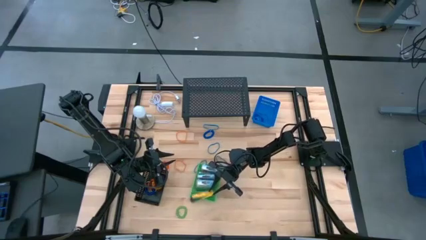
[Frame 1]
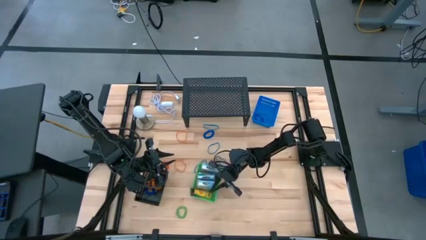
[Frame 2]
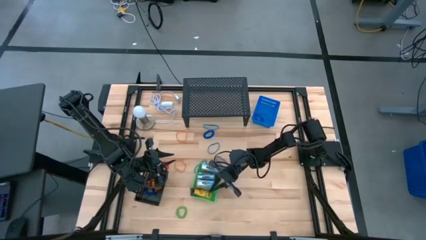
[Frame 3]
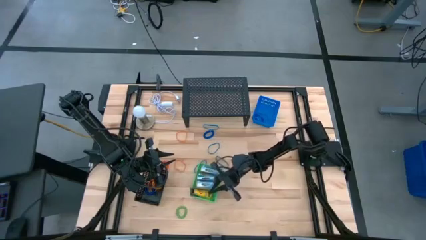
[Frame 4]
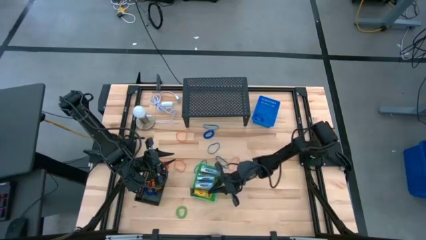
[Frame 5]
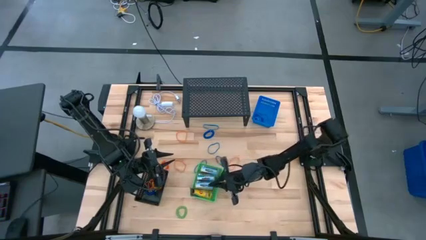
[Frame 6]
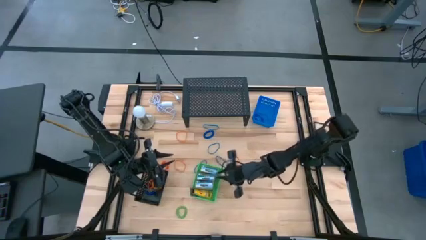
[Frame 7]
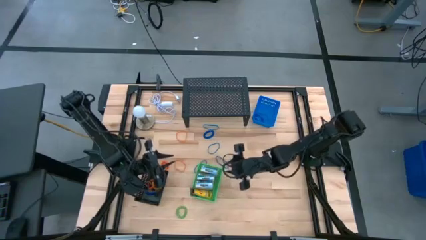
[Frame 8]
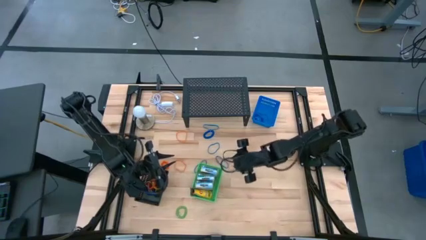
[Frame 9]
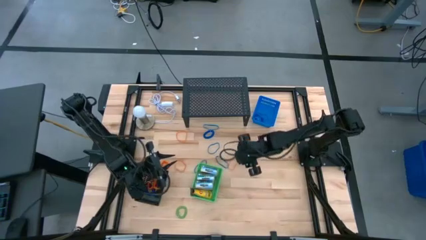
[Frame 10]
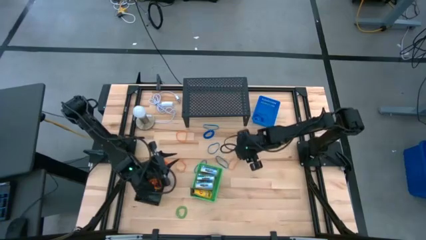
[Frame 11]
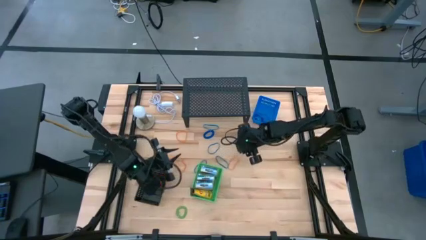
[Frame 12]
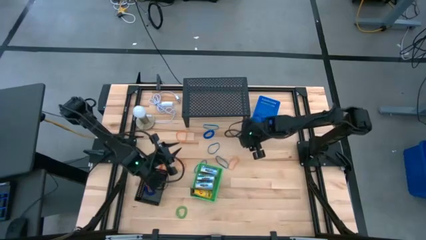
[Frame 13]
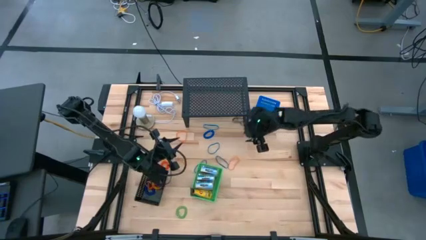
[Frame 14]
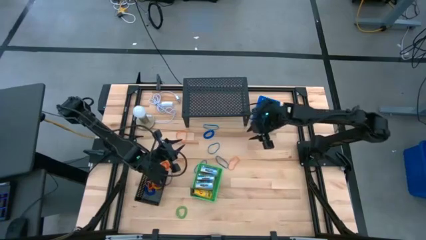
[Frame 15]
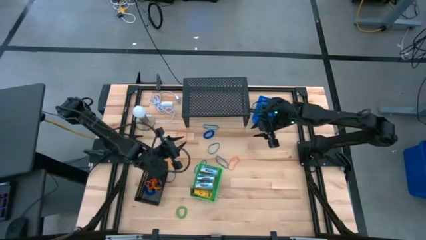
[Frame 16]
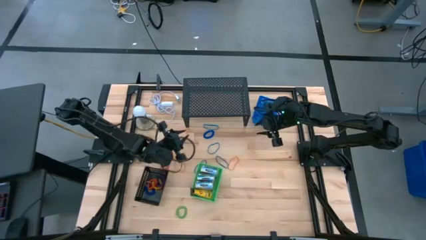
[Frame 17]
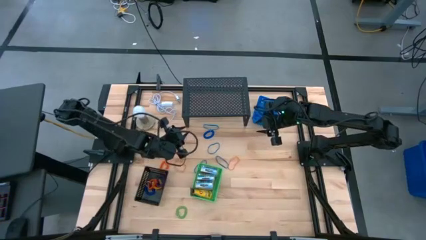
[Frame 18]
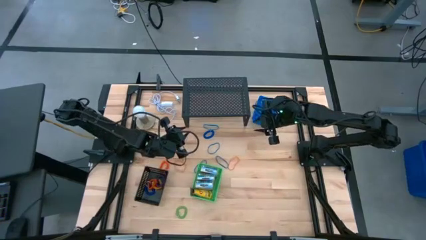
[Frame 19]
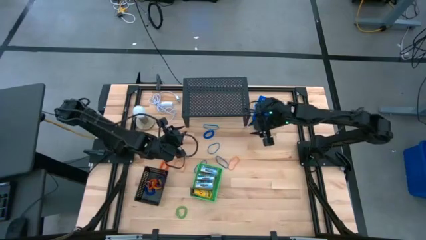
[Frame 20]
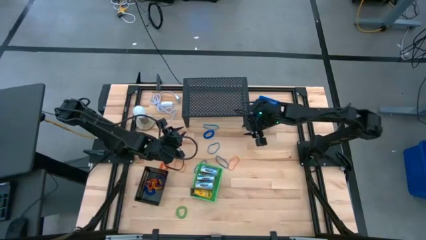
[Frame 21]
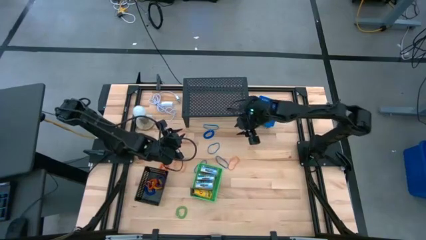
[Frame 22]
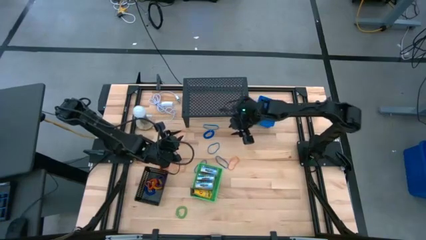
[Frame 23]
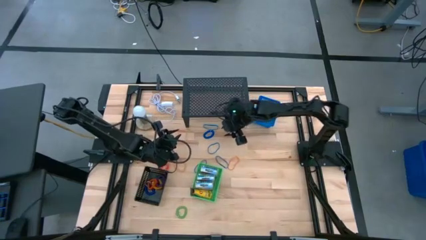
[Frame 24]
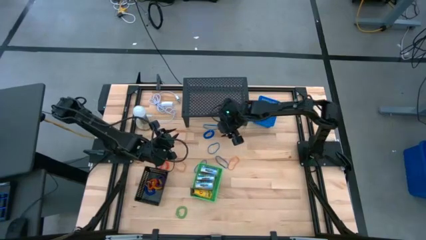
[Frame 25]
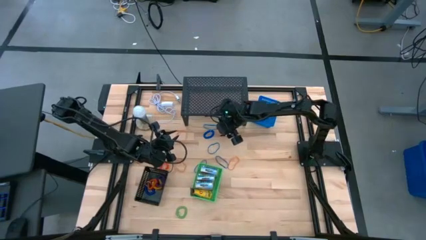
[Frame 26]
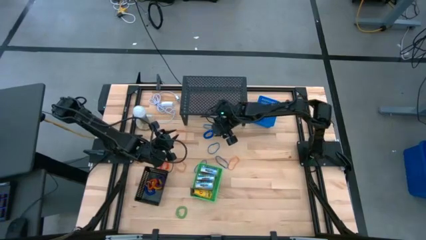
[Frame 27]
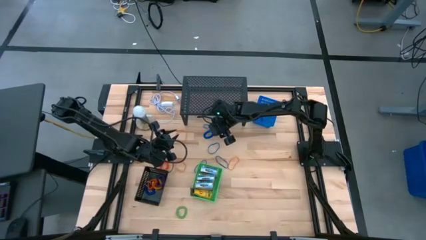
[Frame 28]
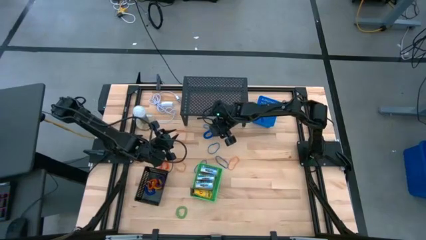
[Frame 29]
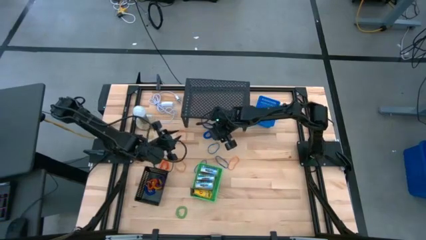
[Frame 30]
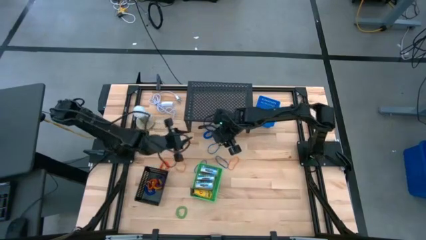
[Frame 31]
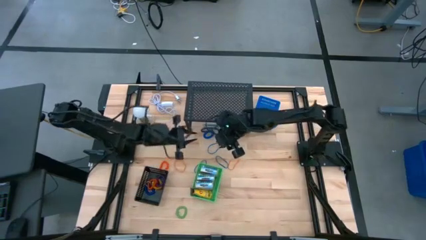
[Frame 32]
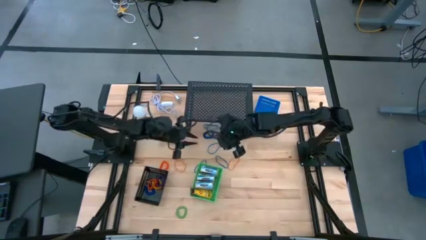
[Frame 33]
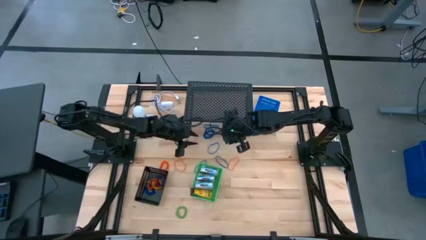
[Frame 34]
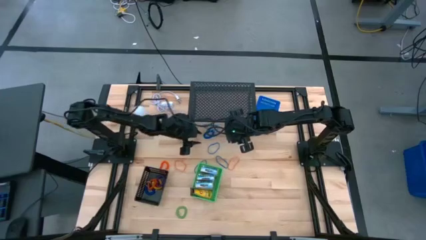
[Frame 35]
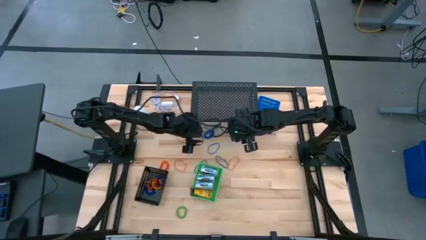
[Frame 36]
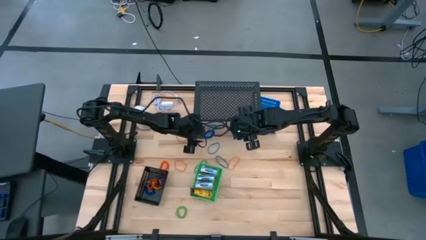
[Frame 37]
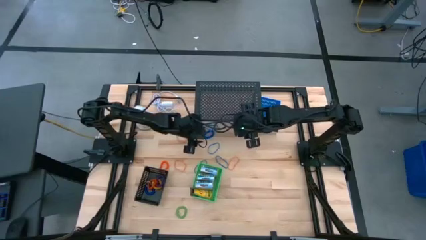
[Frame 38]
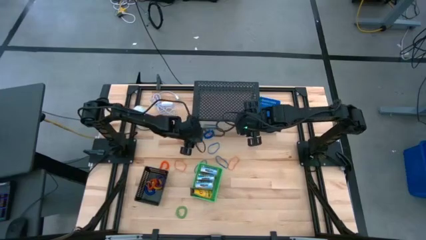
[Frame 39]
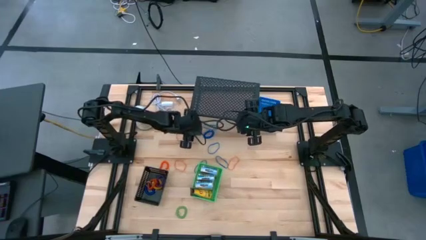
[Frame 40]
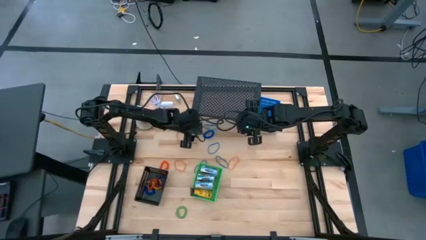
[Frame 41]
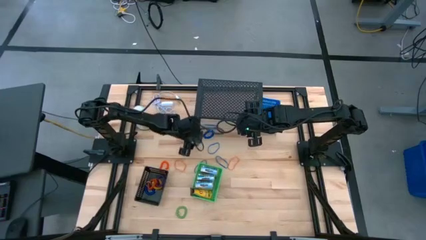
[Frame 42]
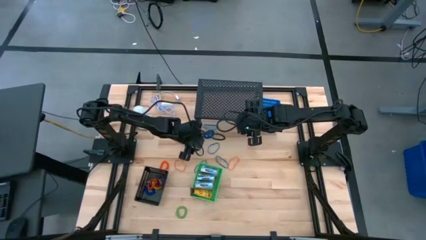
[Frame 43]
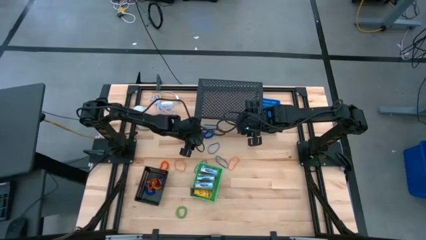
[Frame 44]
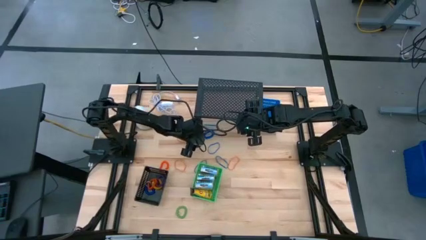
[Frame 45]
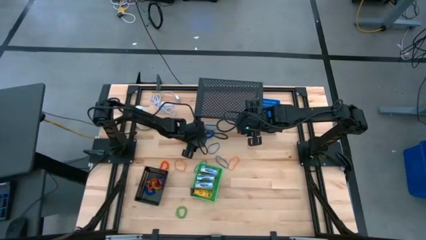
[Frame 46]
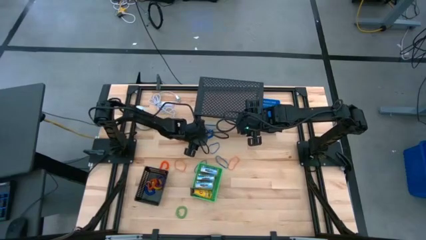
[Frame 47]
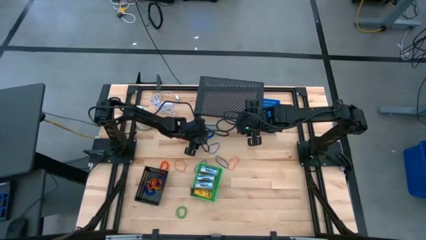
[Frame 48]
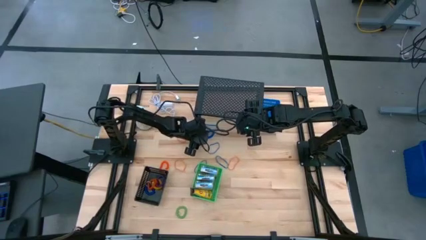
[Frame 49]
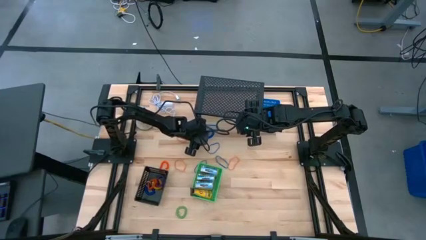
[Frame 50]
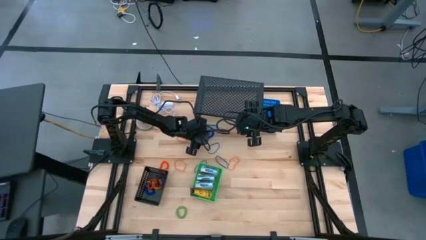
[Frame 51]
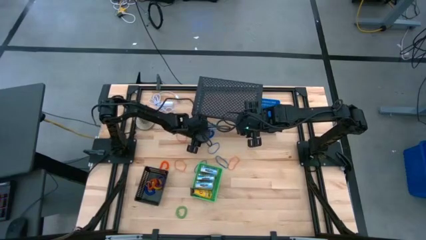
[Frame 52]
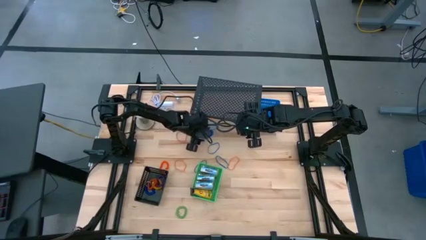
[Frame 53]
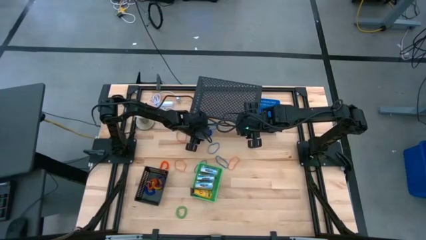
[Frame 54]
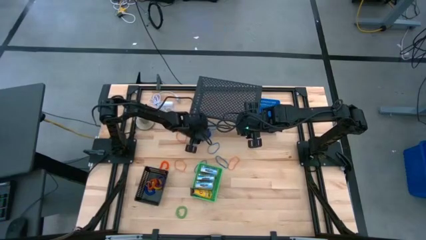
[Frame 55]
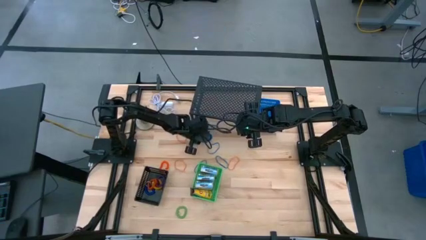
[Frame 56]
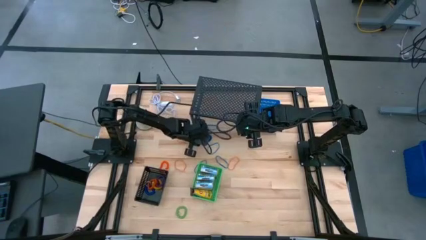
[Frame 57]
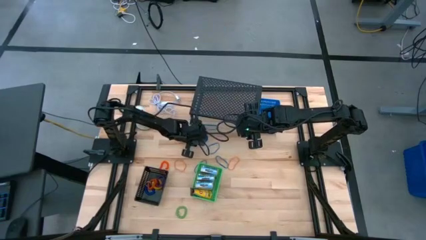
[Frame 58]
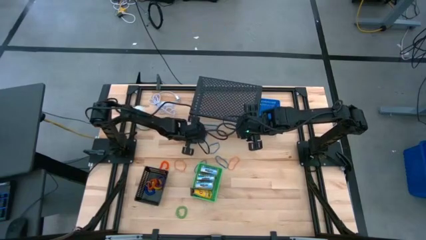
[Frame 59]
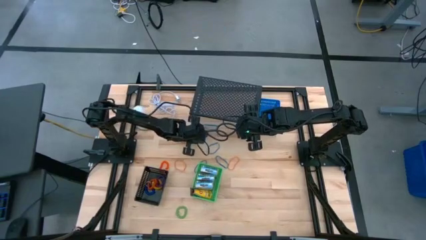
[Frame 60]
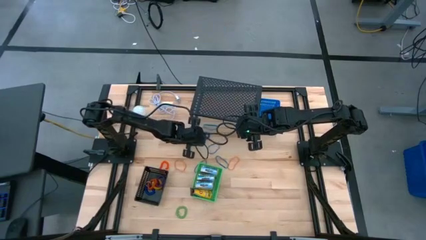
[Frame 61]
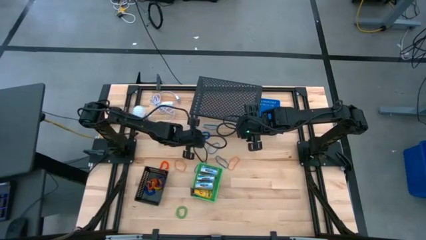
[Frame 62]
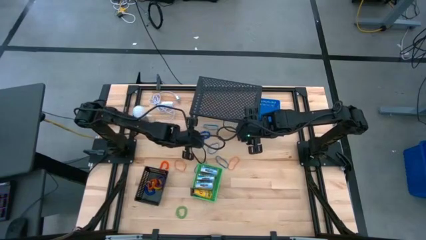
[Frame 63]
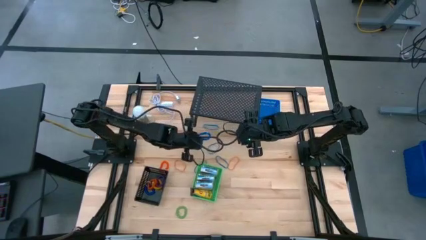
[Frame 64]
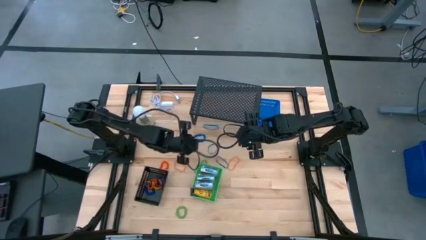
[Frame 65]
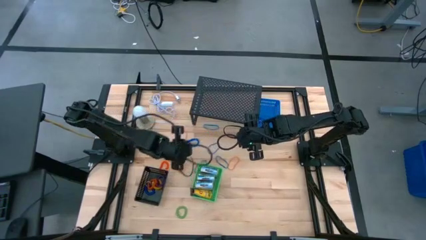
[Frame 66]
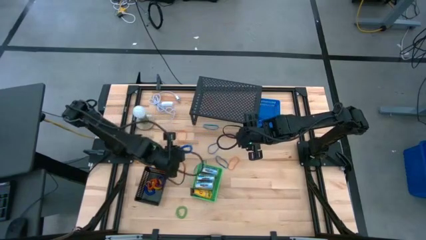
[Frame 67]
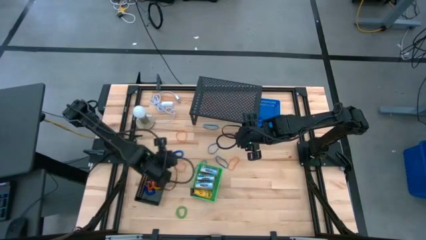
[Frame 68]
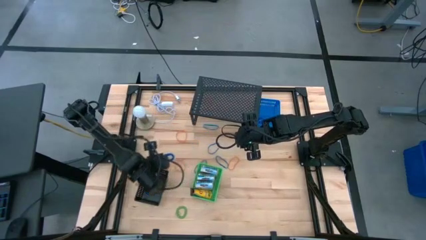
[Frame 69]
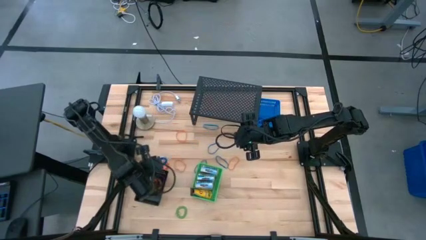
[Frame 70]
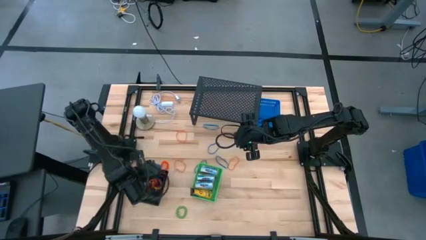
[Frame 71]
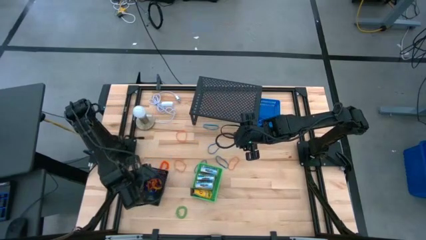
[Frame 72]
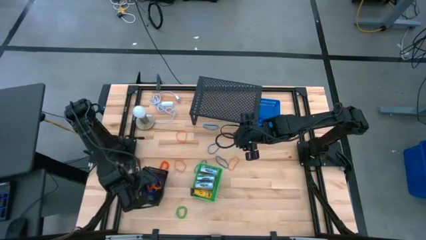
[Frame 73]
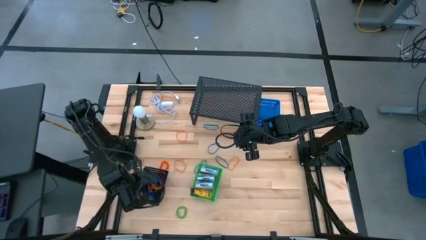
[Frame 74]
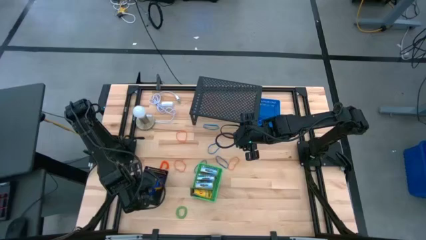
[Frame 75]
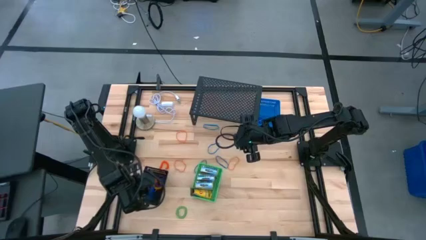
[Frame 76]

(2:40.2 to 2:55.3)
Task: Pick & Place Office Desk Supplies
Put the blue spring keychain into the black bin

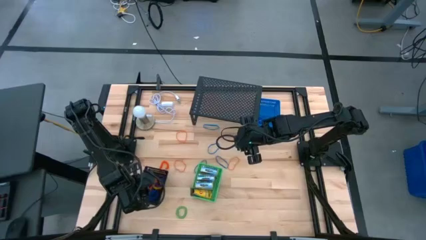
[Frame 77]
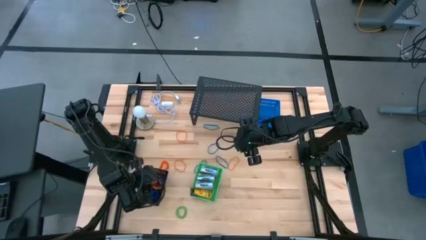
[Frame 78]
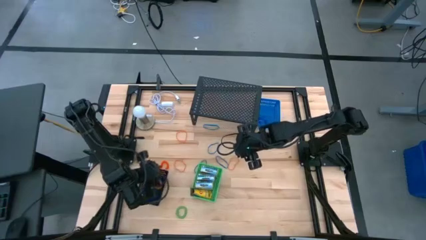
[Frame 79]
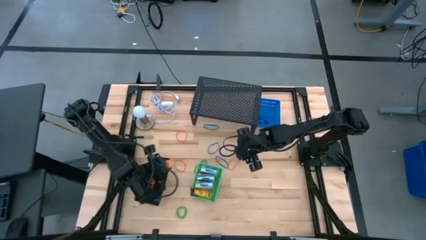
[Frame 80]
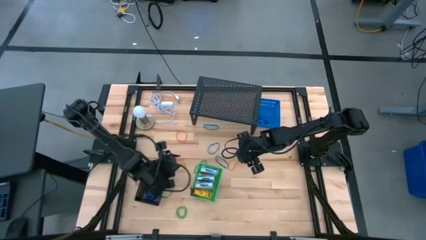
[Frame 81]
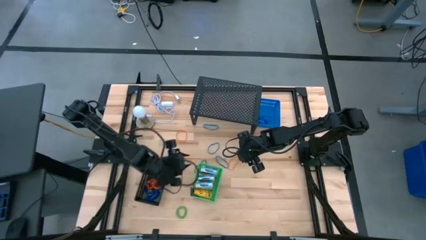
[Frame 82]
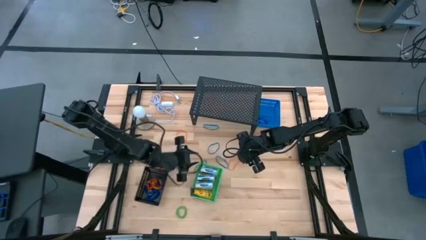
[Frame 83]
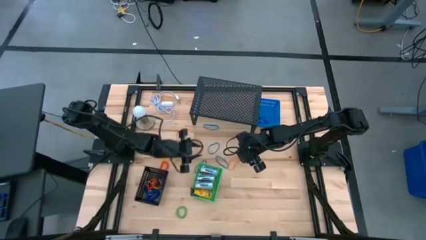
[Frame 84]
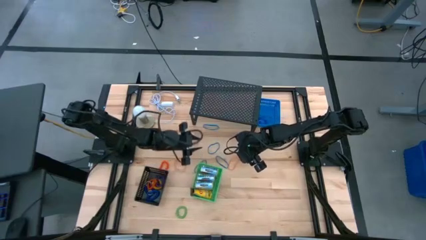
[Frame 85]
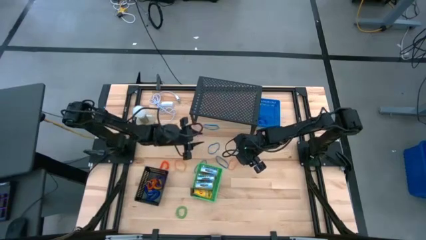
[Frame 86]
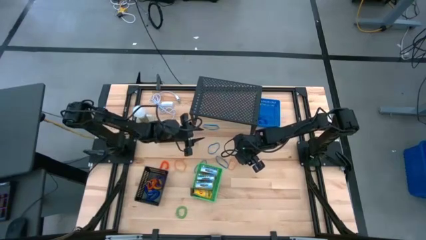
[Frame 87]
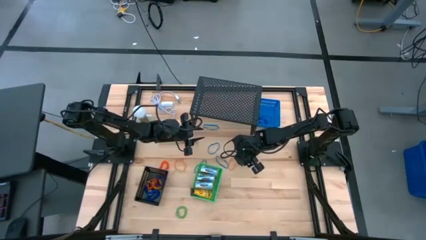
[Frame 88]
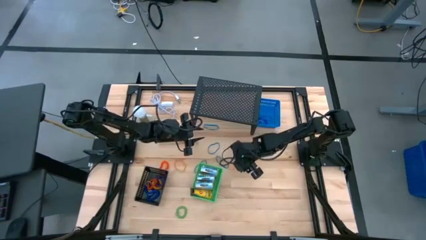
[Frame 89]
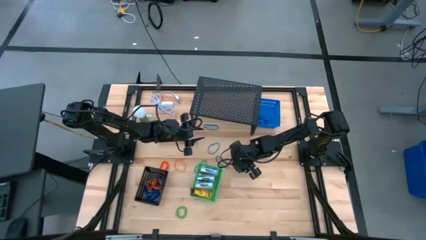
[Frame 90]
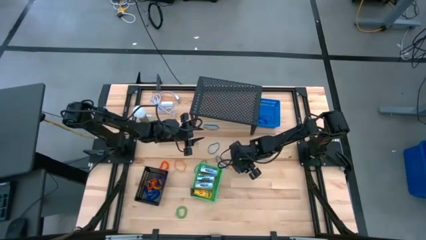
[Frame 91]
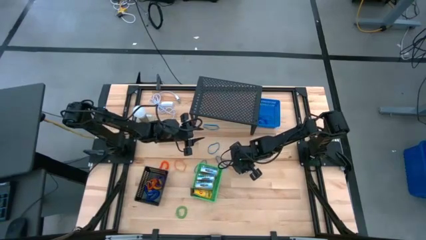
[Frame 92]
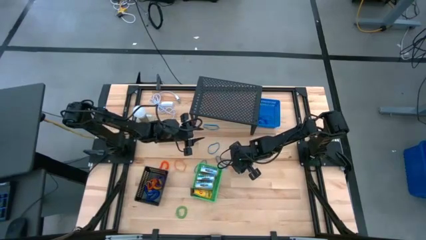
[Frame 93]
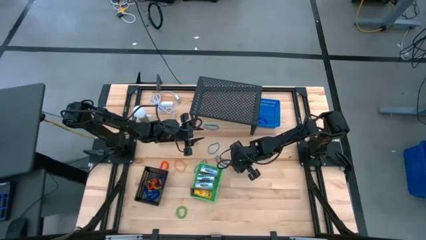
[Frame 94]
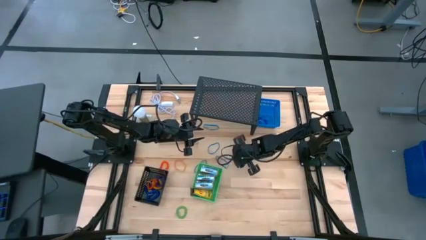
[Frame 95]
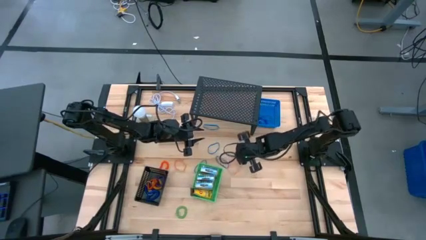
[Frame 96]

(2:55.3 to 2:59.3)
Put the orange rubberband into the blue bin
